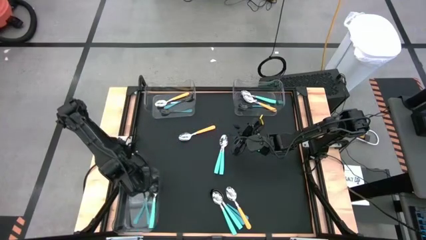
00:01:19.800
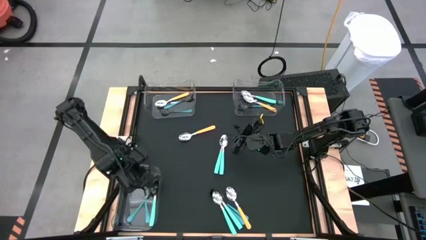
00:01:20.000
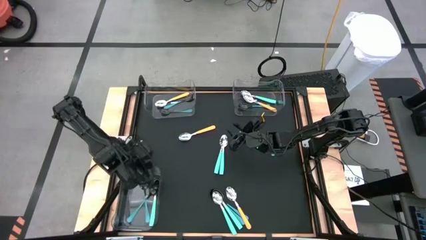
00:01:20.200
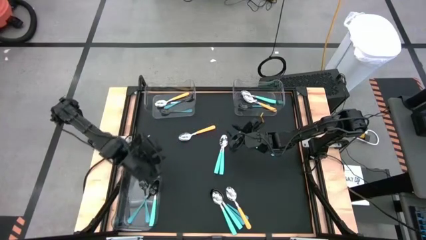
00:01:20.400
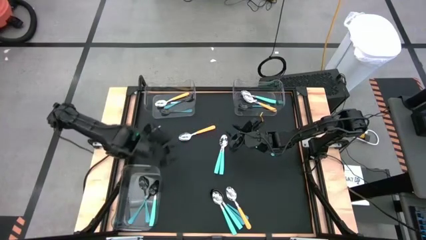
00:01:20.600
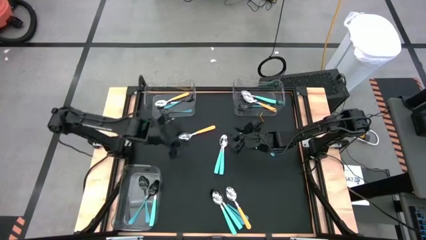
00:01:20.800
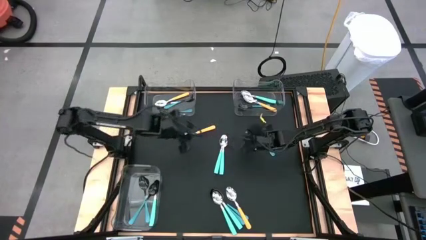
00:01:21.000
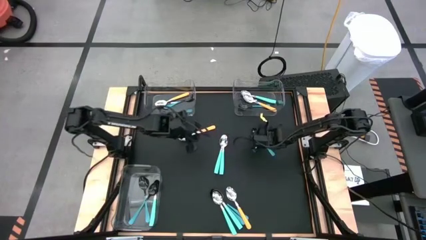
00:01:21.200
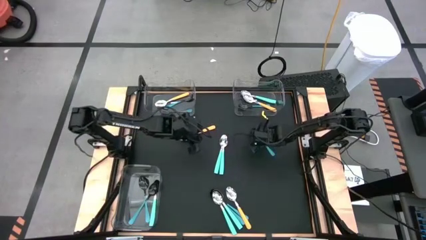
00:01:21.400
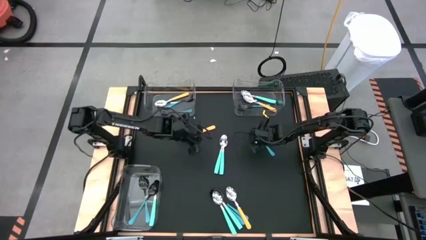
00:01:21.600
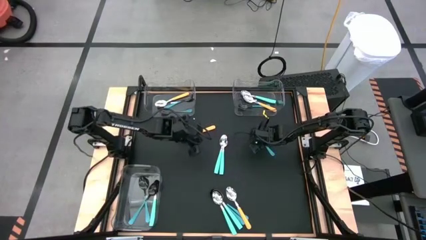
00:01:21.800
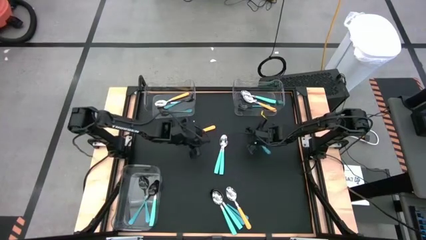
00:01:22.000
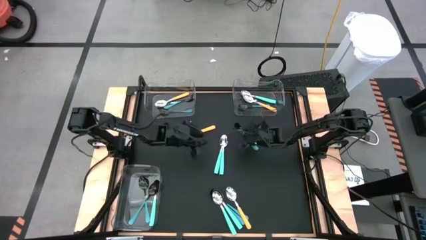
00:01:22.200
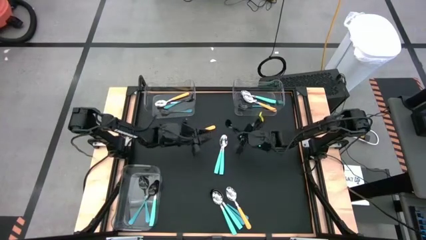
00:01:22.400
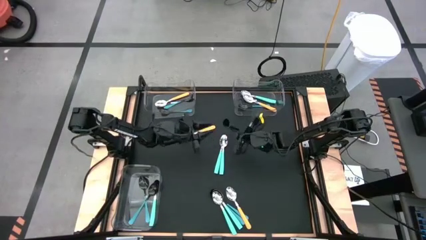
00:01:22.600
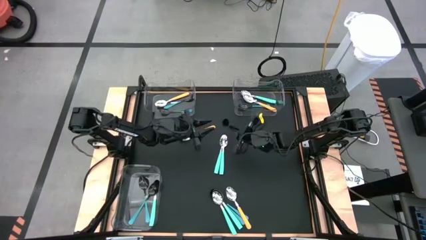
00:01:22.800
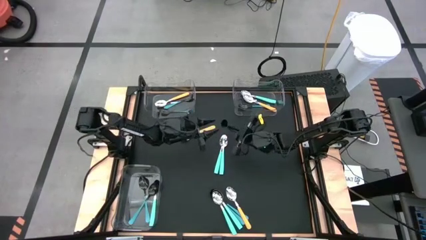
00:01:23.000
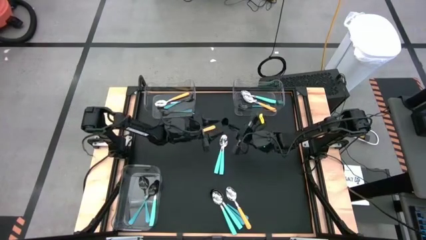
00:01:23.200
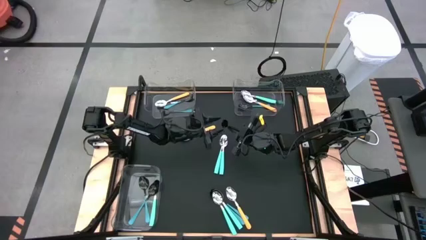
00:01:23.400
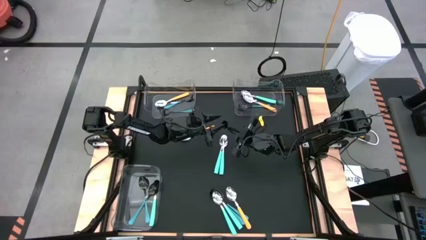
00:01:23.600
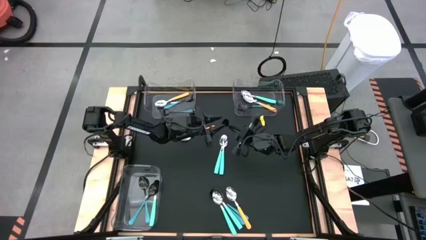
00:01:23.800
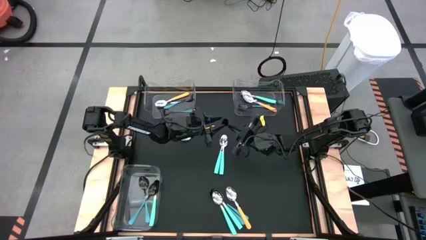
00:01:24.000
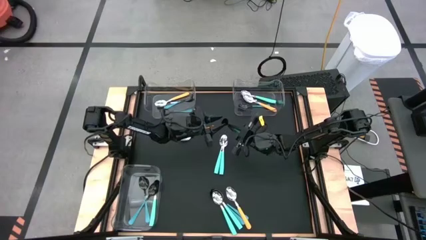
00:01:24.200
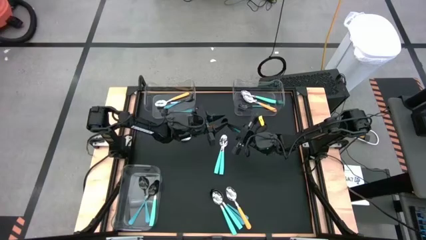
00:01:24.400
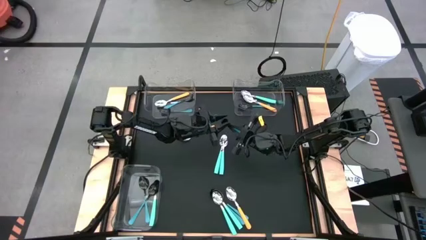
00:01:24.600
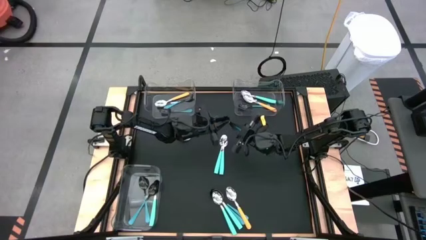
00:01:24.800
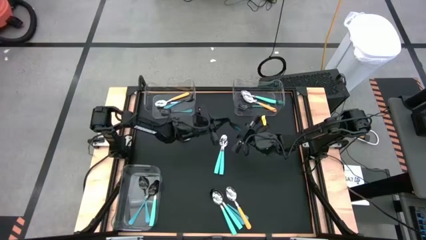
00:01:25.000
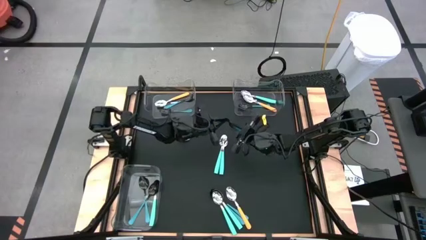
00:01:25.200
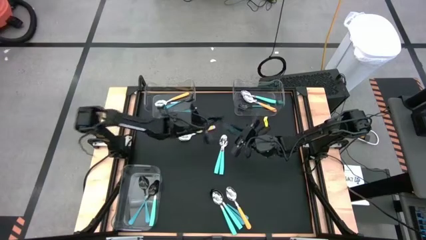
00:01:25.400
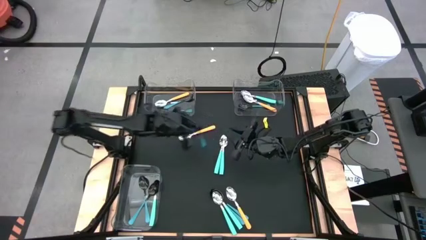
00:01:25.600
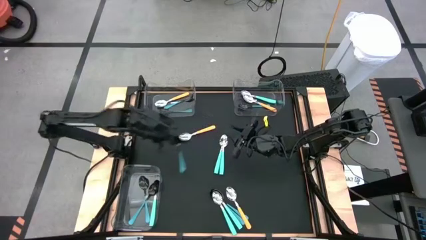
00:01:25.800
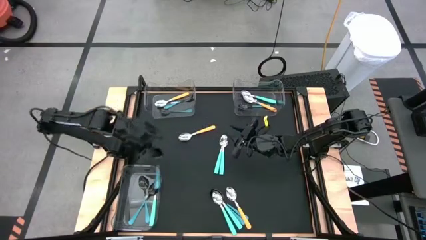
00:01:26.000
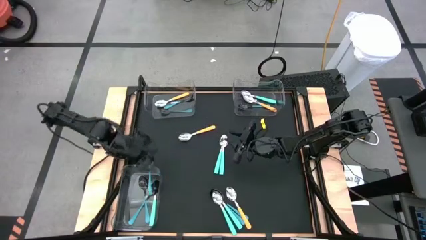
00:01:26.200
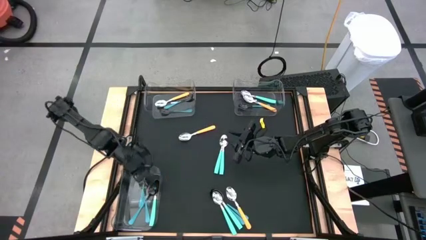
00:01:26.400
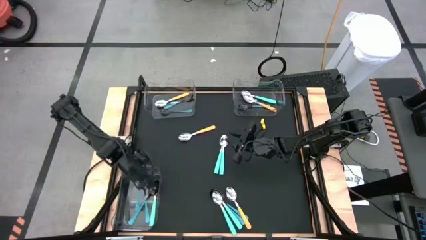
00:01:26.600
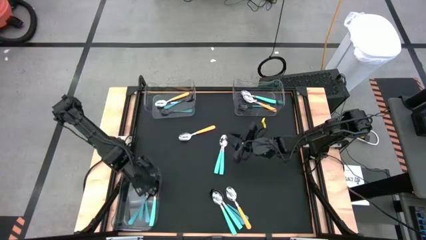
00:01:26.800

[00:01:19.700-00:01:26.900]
Task: Sort silverware by color (type)
Put the blue spoon into the bottom left transparent bin

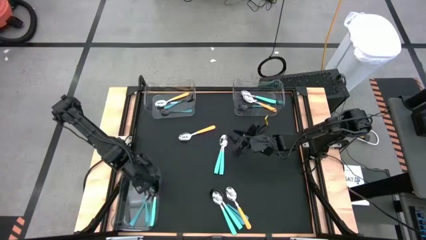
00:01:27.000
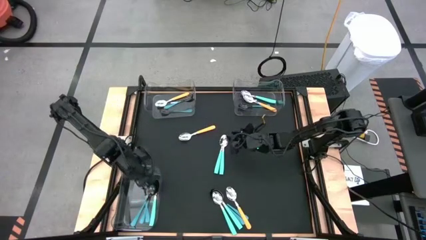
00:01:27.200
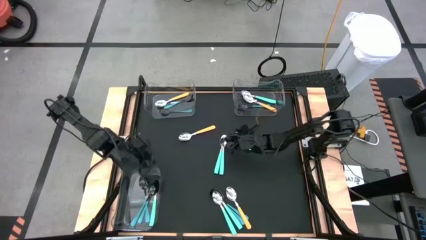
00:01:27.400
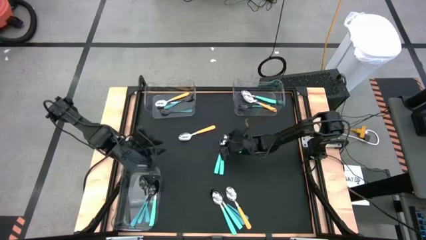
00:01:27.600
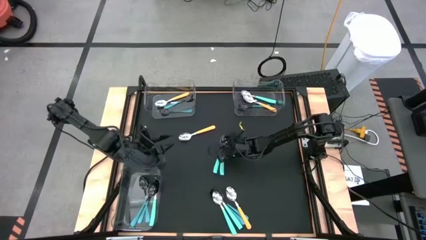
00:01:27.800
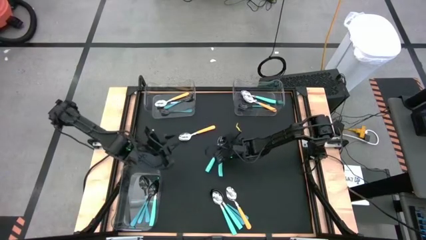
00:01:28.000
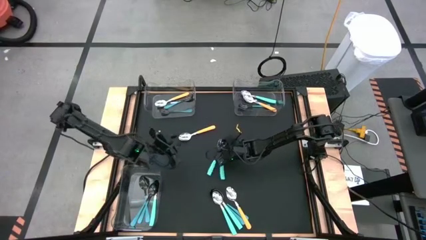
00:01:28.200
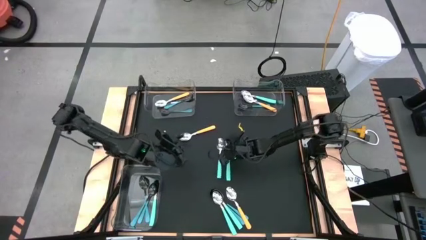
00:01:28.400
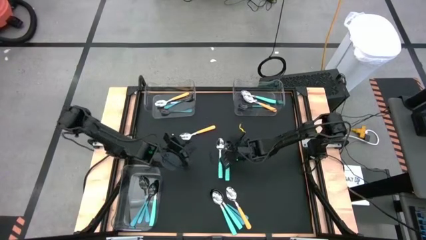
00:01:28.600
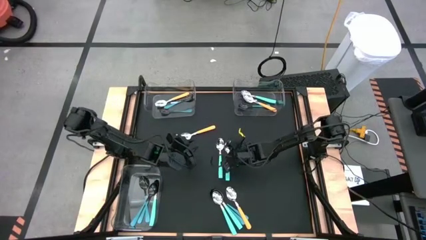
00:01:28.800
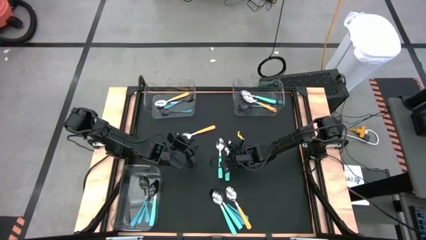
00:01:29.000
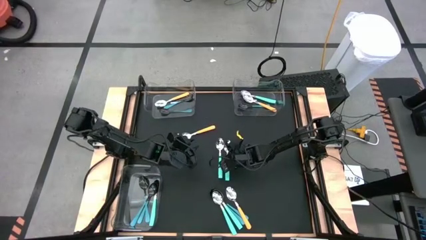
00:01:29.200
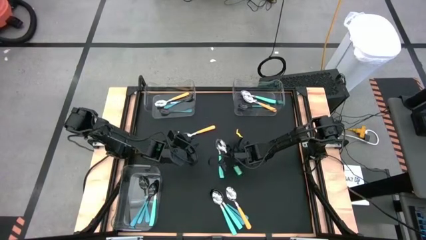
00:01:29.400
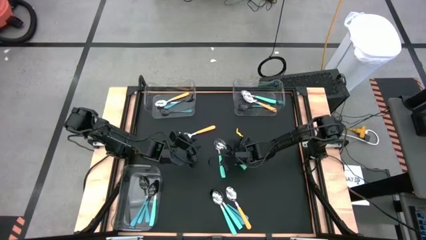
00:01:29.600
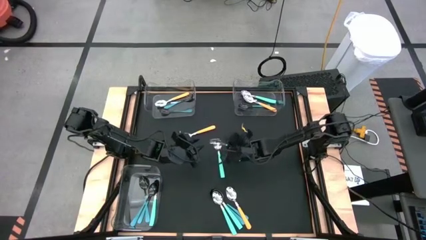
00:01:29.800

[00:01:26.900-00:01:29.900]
Put the green spoon into the top right transparent bin

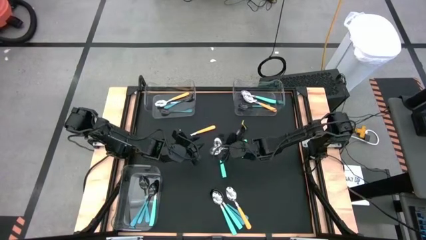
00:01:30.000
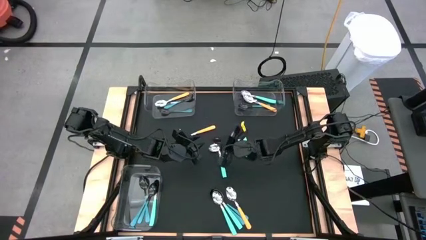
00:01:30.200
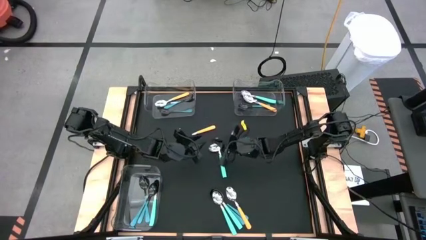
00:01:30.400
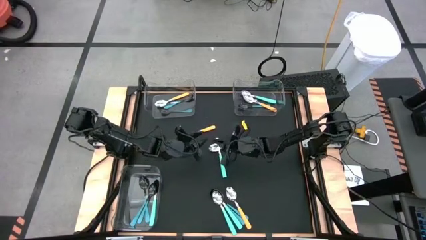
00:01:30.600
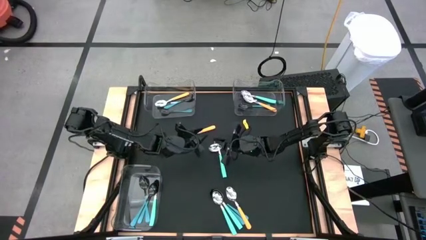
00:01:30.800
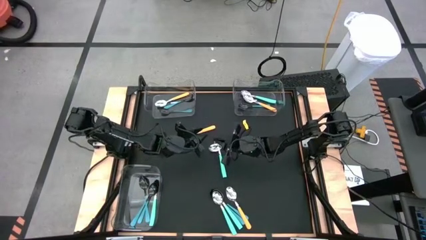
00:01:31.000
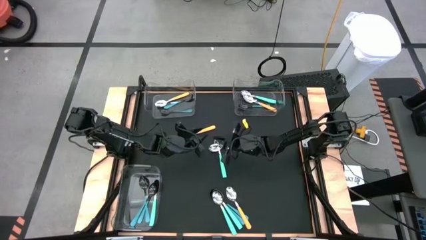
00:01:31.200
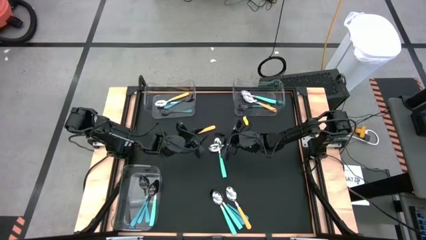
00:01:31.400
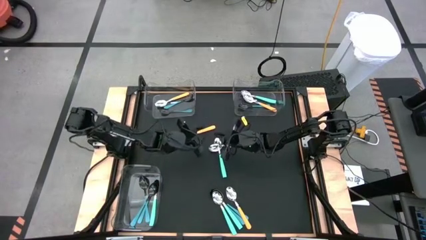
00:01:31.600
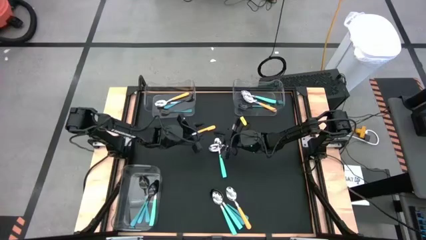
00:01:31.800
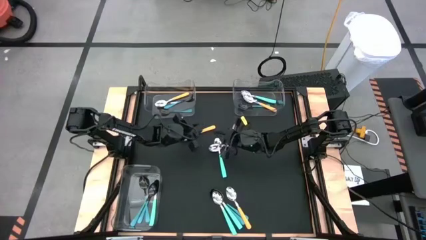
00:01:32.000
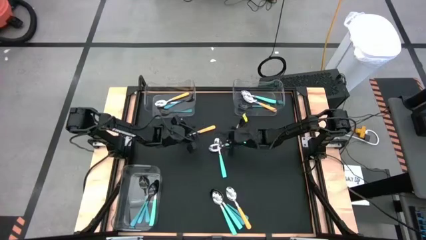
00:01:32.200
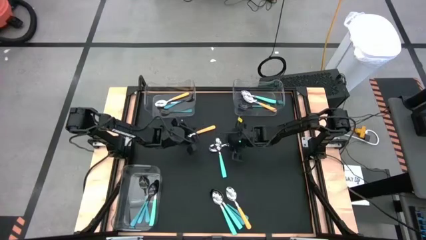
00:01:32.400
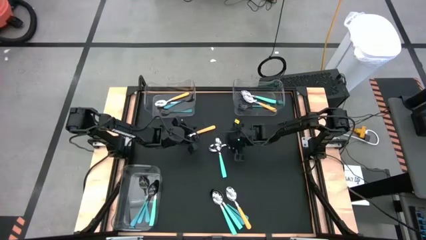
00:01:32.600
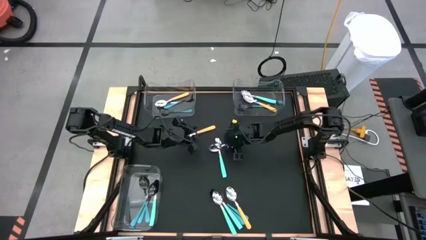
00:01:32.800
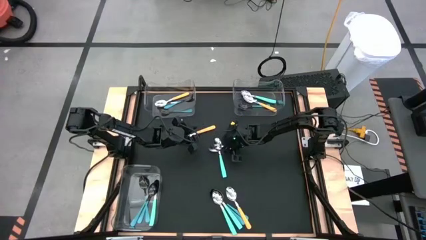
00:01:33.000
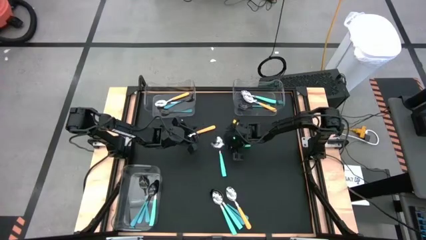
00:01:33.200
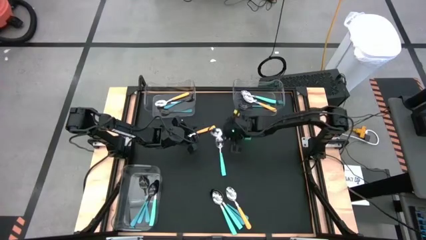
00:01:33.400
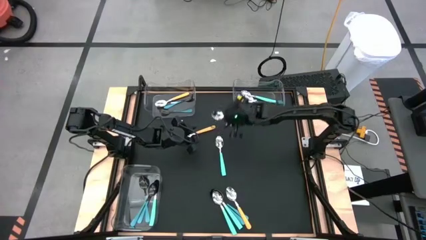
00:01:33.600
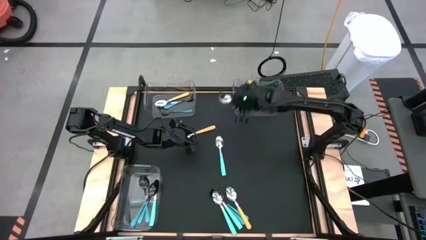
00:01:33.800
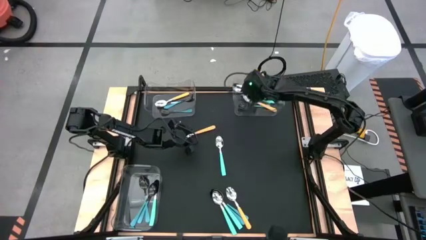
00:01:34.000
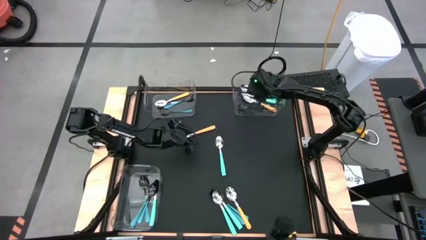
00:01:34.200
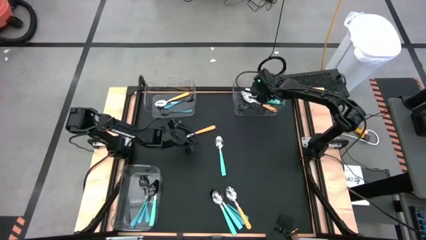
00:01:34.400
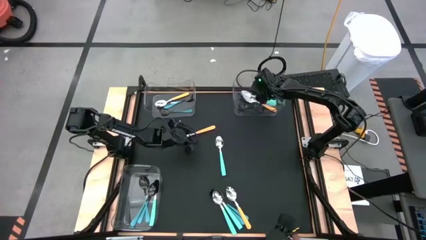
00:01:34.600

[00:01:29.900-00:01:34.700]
Put the green spoon into the top right transparent bin

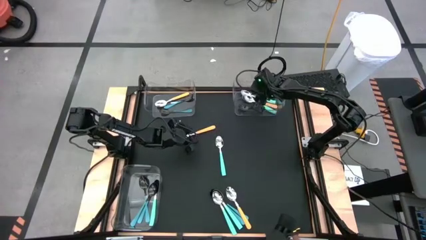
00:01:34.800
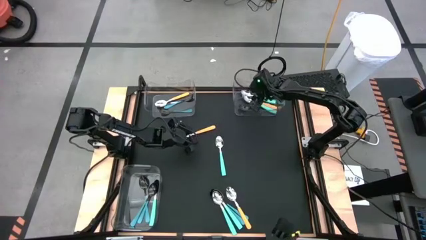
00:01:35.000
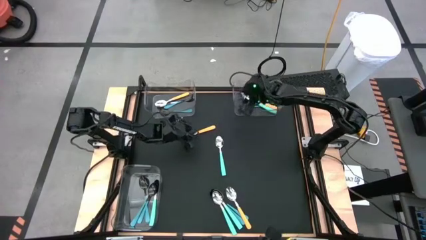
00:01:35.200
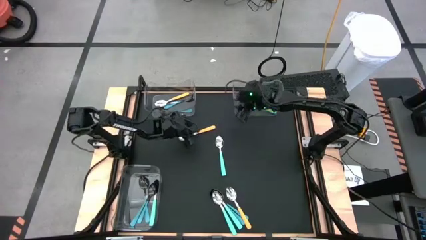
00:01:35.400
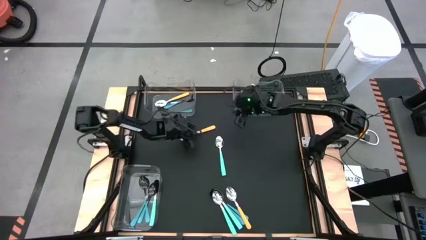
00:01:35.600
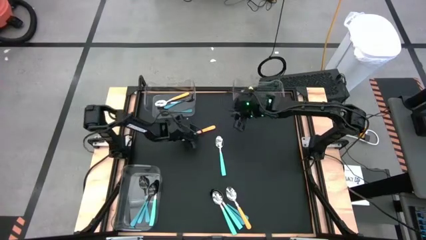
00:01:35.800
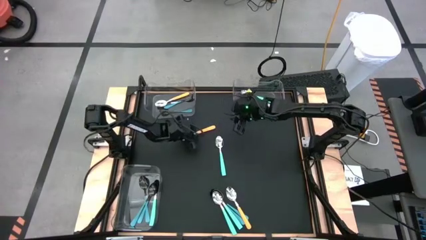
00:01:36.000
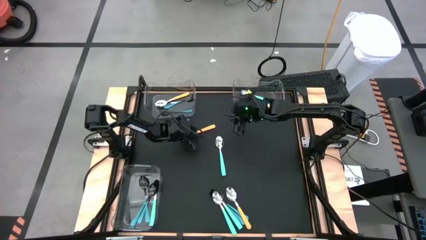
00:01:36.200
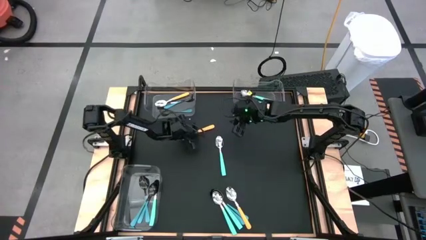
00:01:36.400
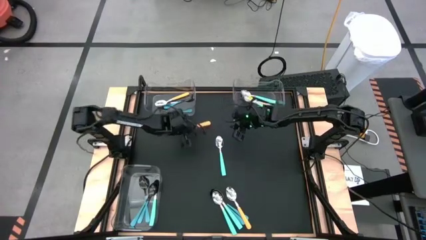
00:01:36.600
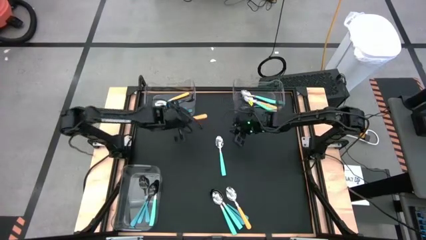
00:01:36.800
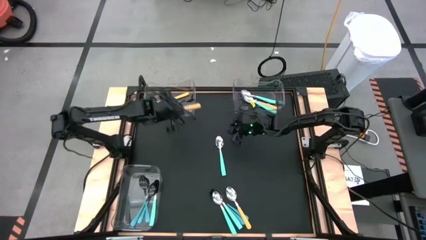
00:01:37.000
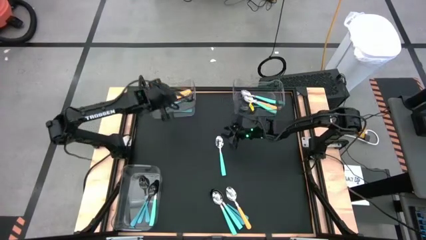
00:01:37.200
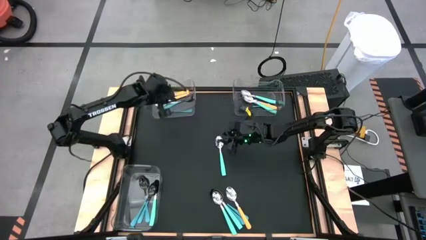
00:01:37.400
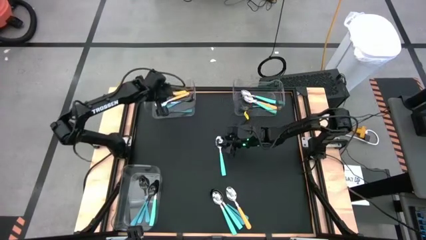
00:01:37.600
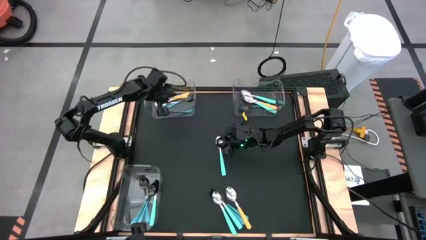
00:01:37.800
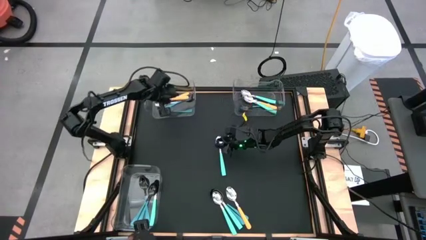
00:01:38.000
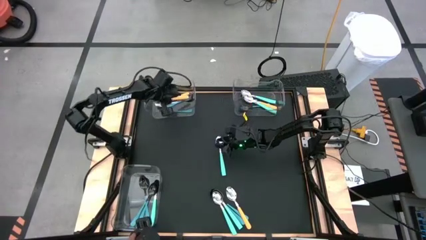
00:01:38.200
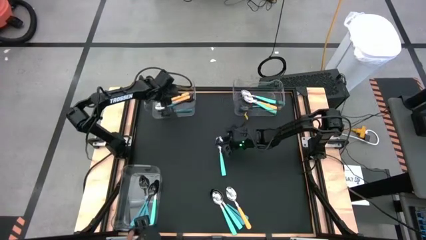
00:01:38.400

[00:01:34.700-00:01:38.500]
Put the yellow spoon into the top left transparent bin
